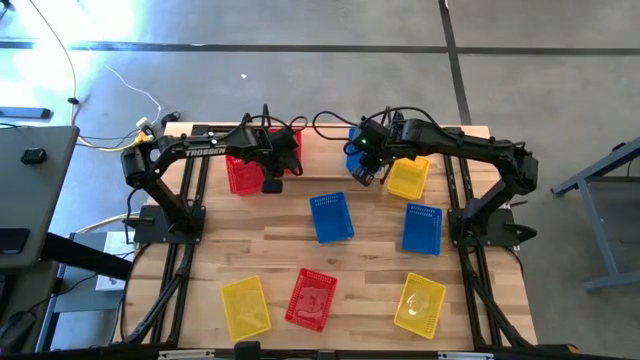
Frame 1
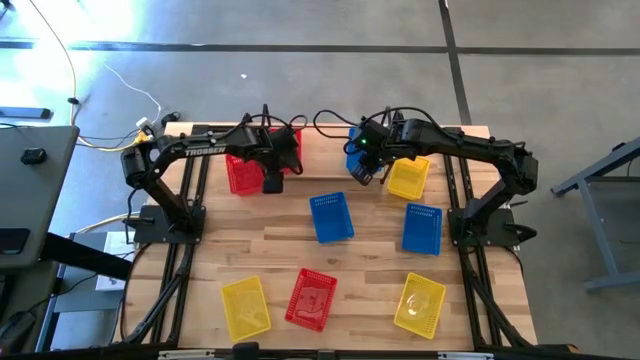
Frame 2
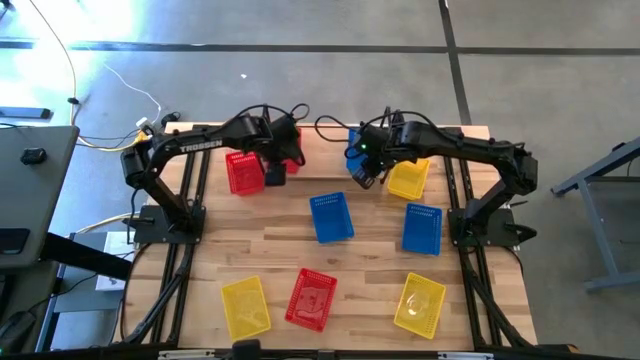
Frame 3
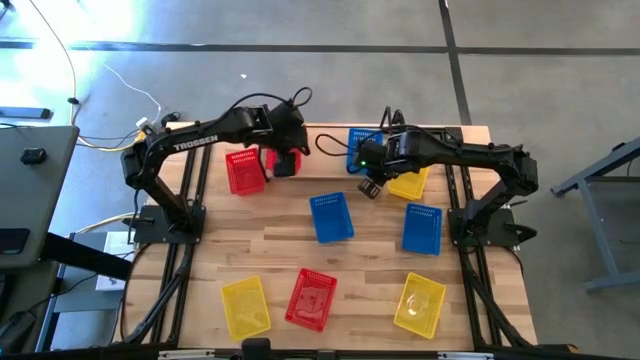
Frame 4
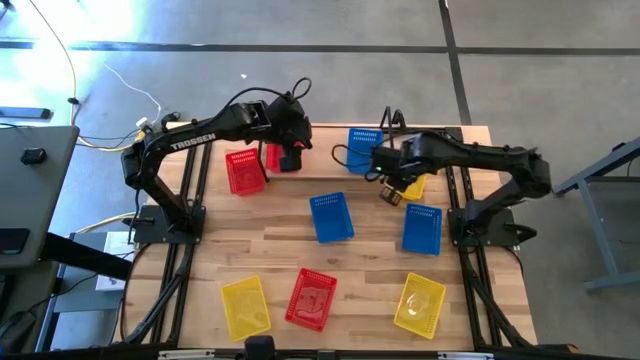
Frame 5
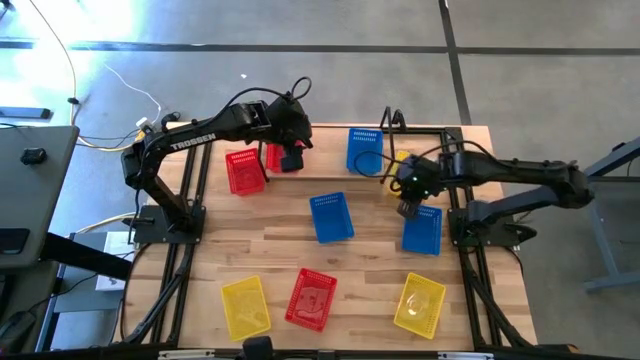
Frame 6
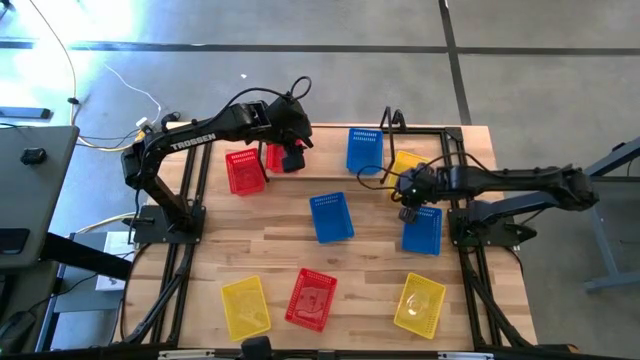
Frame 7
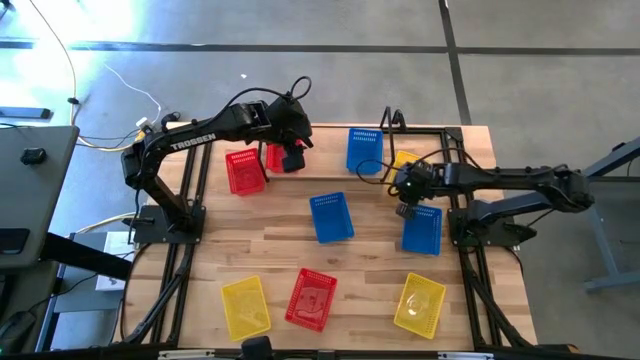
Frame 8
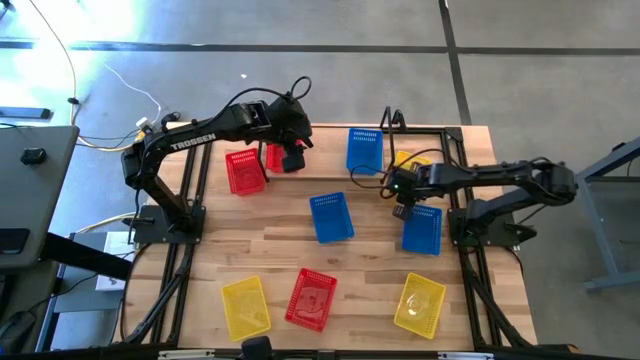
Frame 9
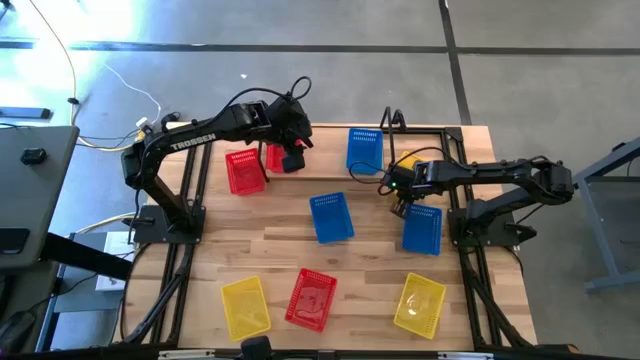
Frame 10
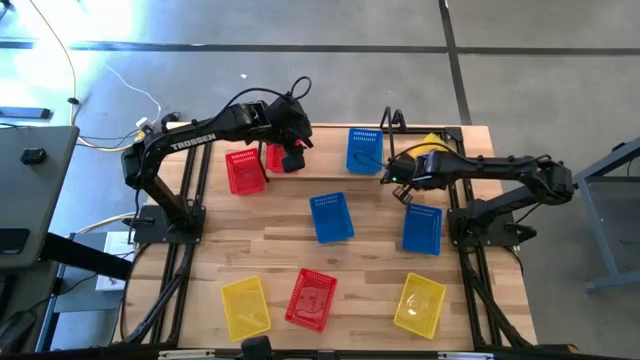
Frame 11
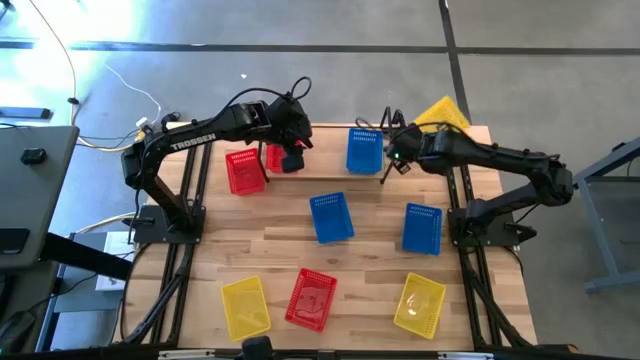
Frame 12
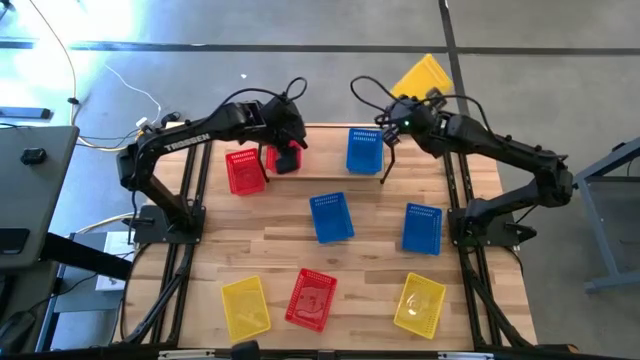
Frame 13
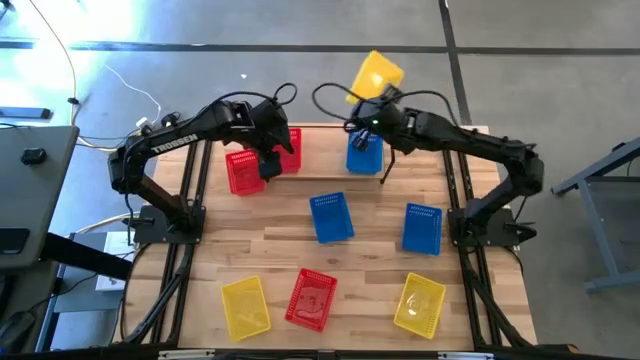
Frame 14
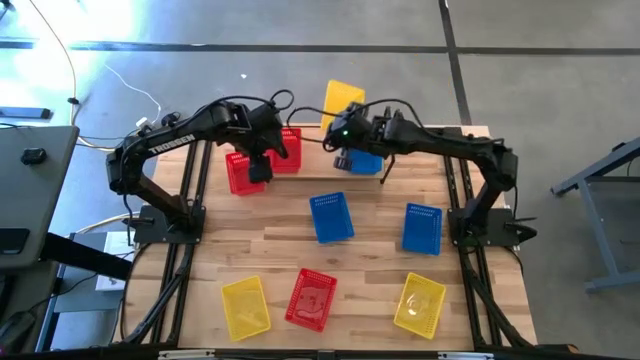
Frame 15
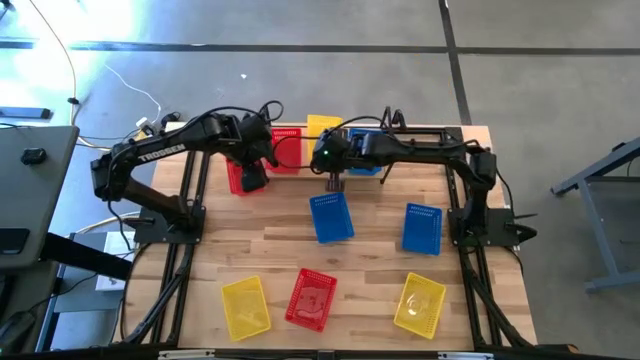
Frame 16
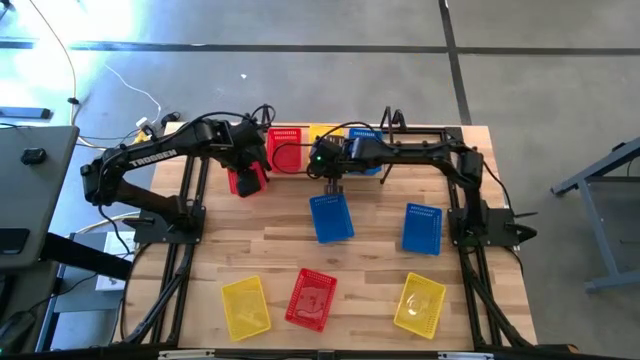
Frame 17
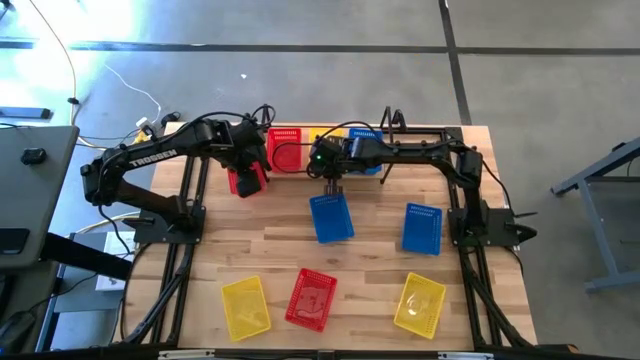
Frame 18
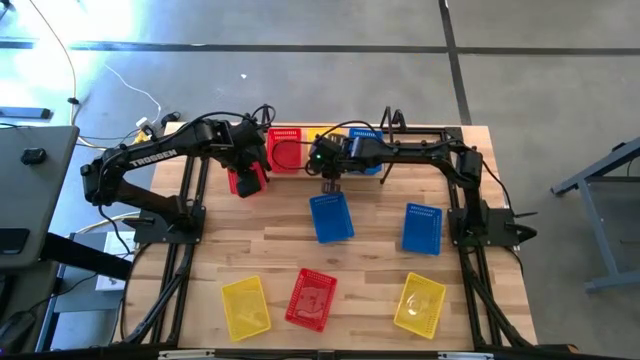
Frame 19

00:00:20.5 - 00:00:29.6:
Task: Stack baskets on shelf by color
Put the top right yellow bin on the shelf

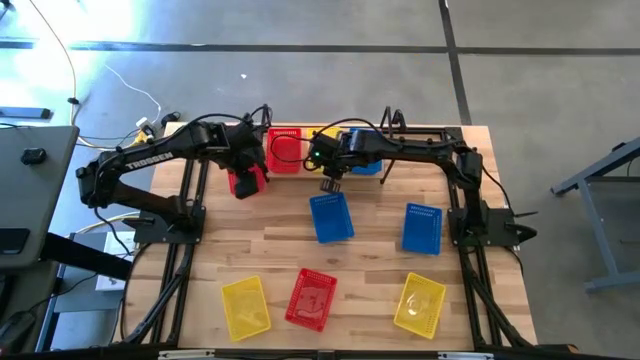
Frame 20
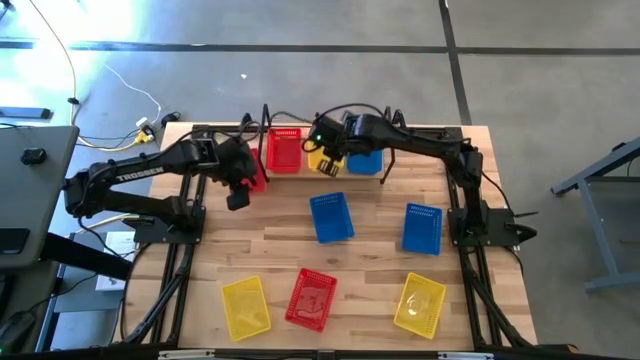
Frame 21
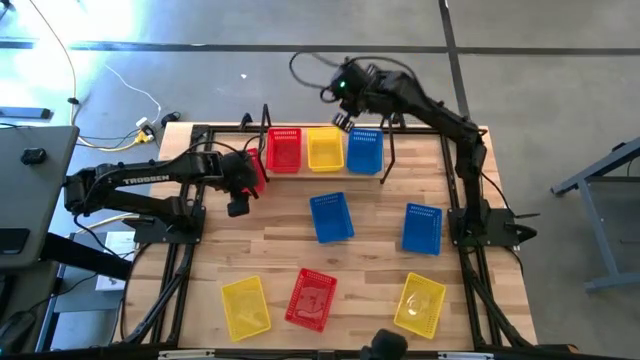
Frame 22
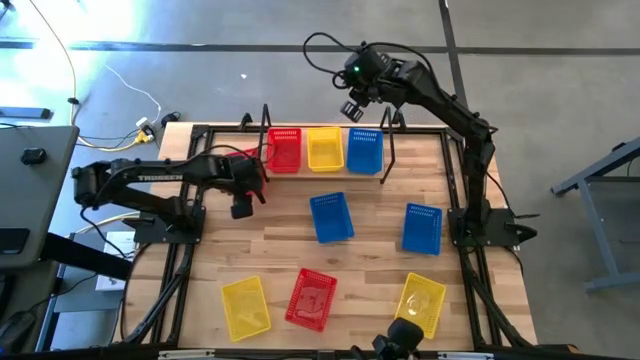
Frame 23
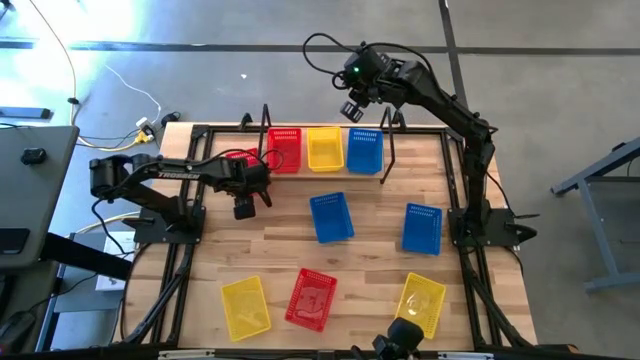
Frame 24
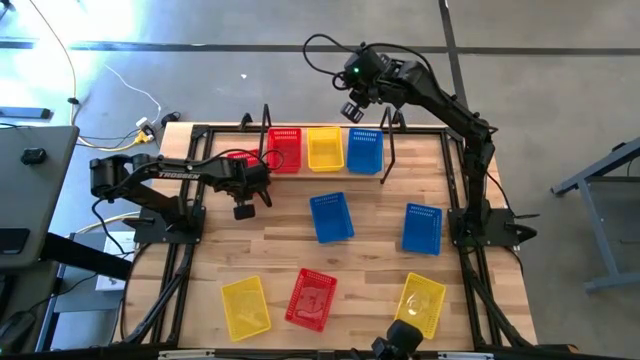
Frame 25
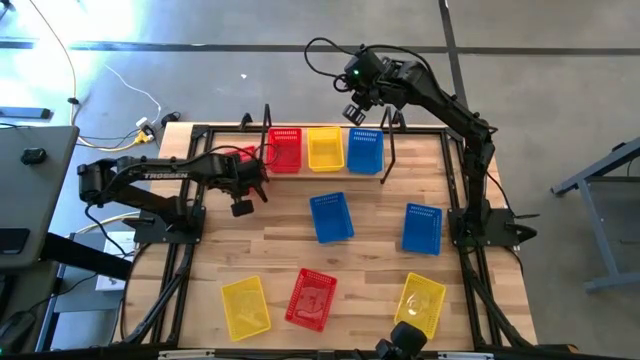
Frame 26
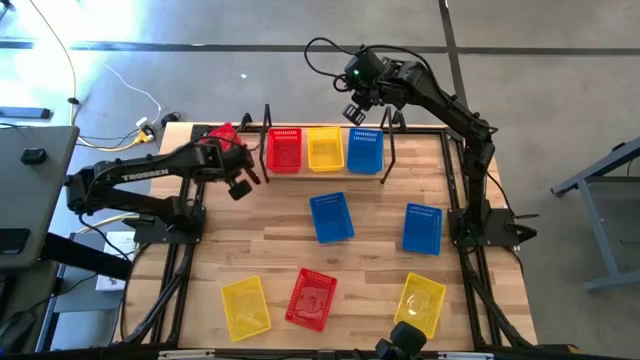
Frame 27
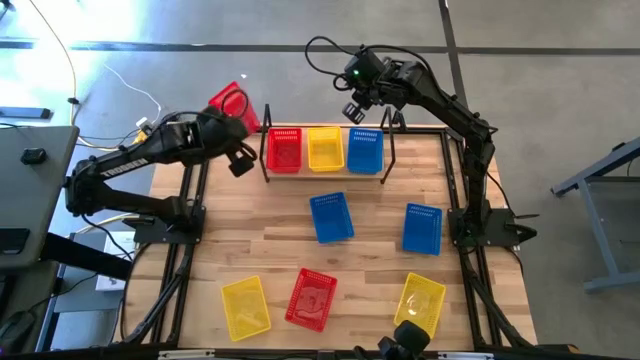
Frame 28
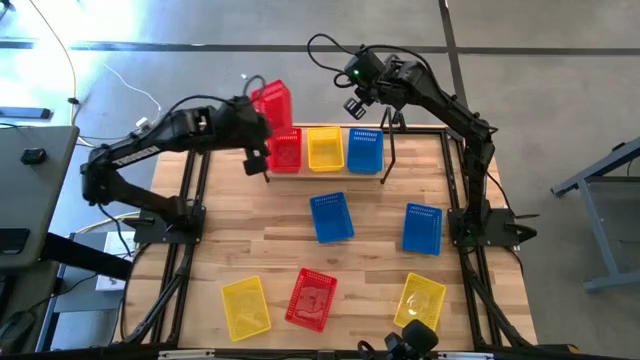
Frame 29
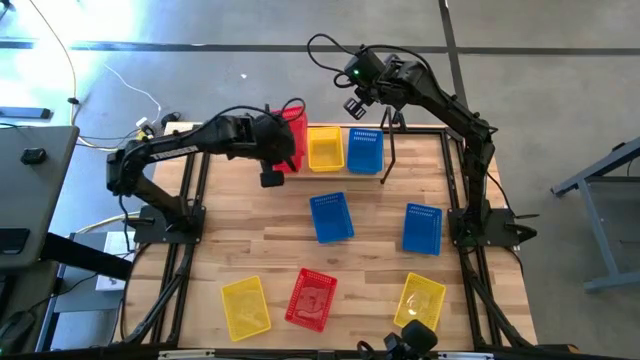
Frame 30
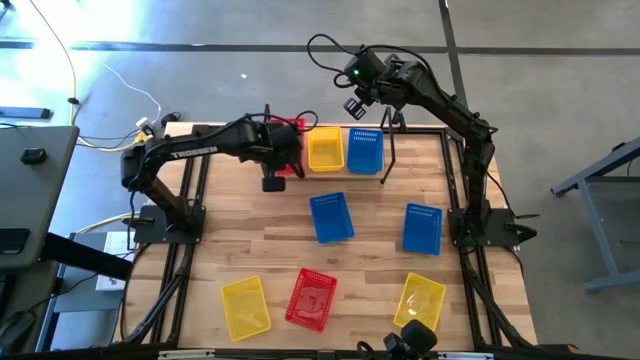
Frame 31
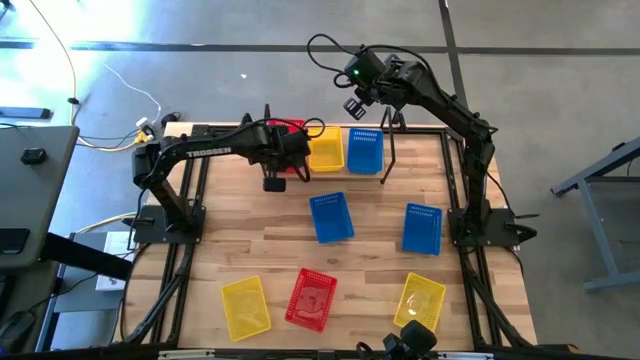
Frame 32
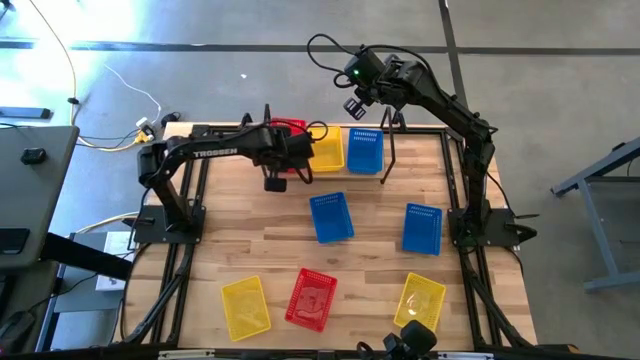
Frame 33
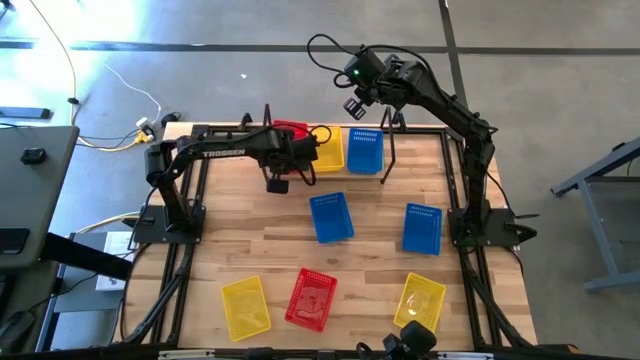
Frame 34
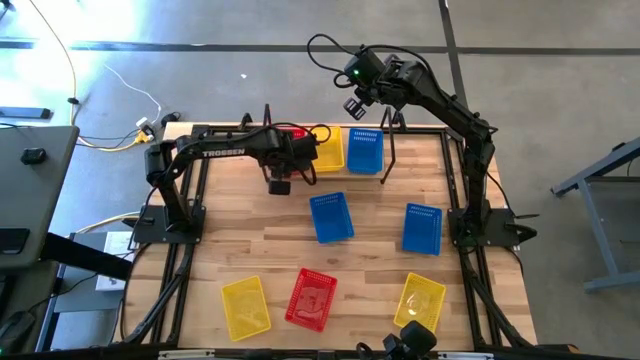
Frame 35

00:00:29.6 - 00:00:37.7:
Stack the top red bin on top of the red bin

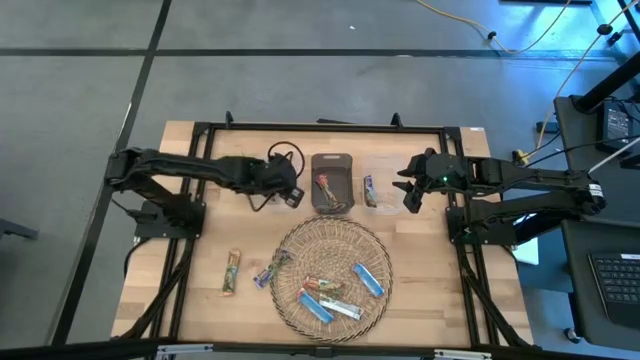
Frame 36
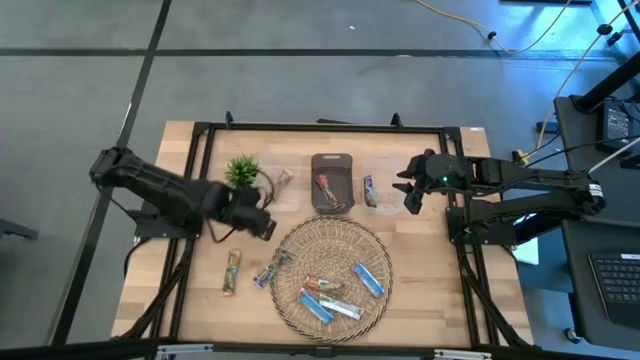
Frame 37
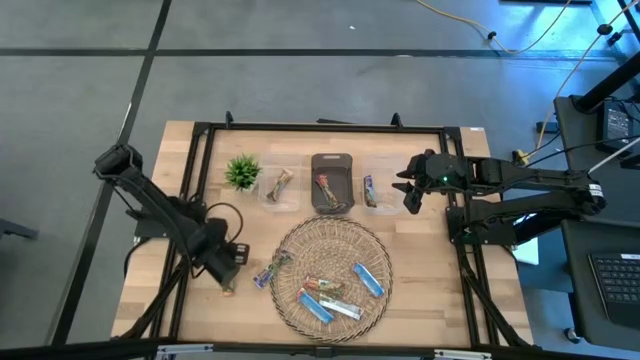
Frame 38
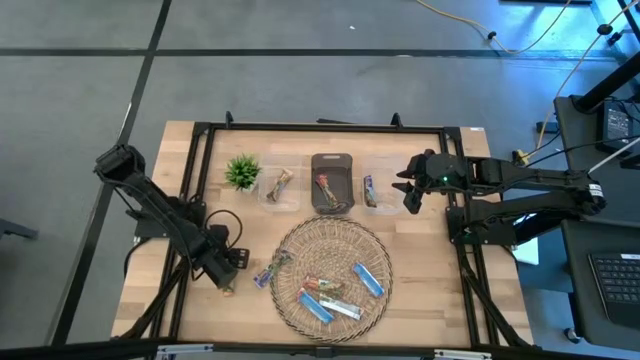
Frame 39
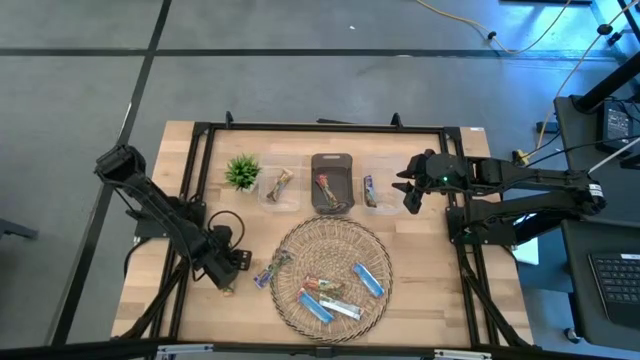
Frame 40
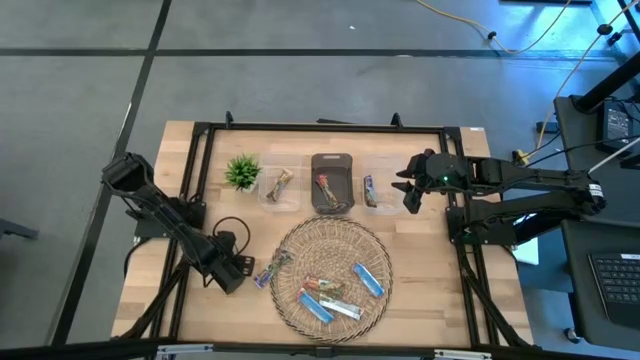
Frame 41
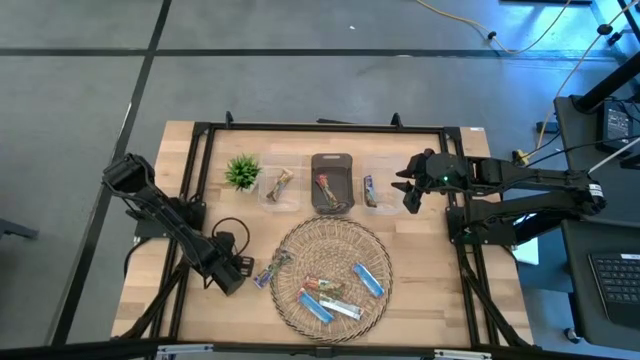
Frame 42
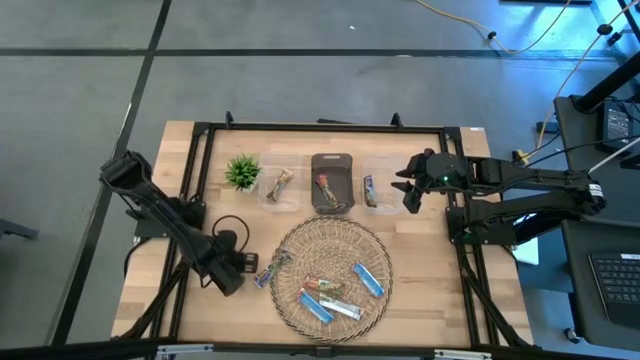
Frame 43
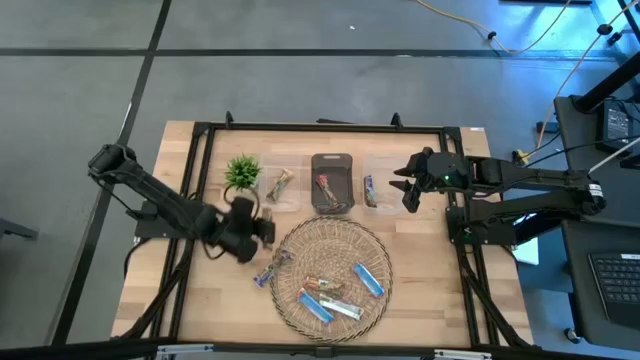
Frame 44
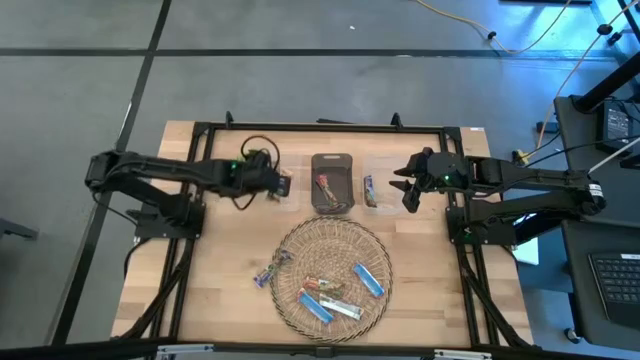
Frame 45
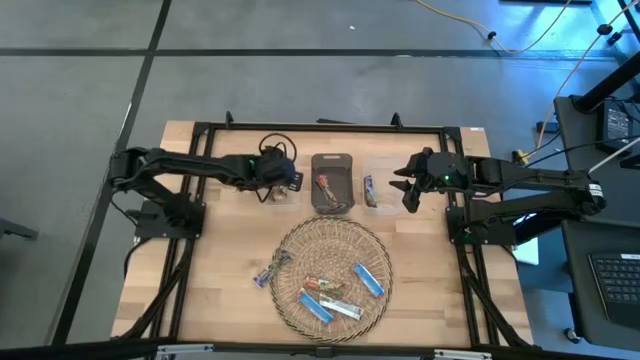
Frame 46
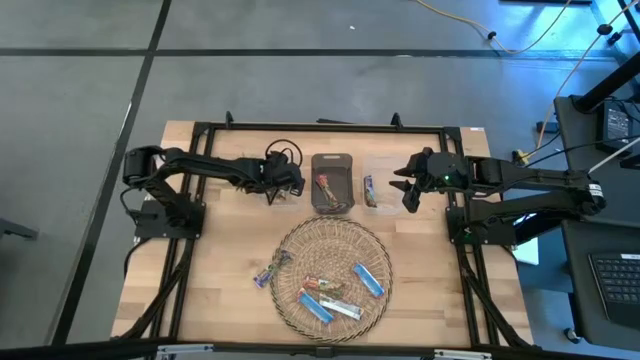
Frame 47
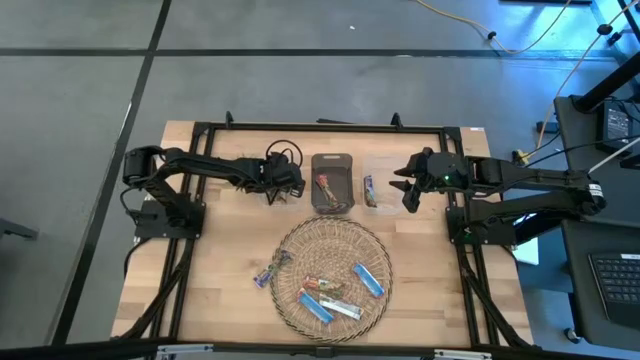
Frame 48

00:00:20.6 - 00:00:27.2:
Task: Pick and place Granola Bars by type
Put the orange granola bar into the left transparent bin
